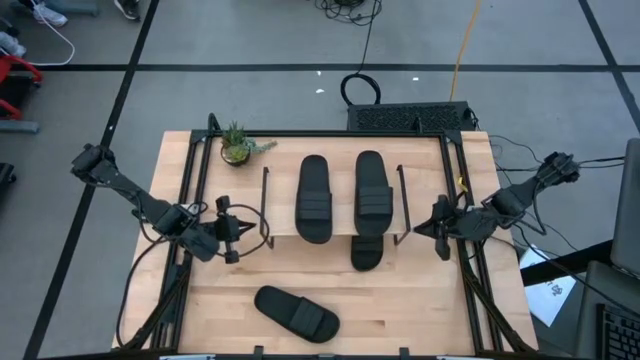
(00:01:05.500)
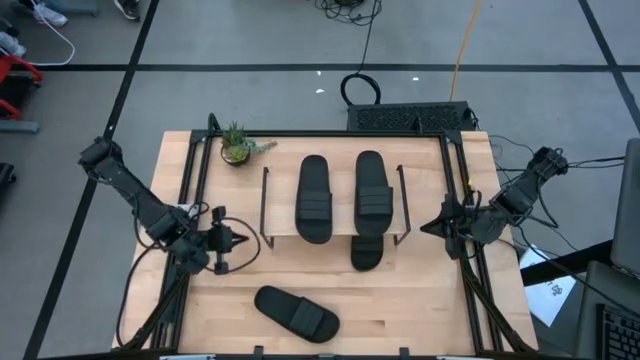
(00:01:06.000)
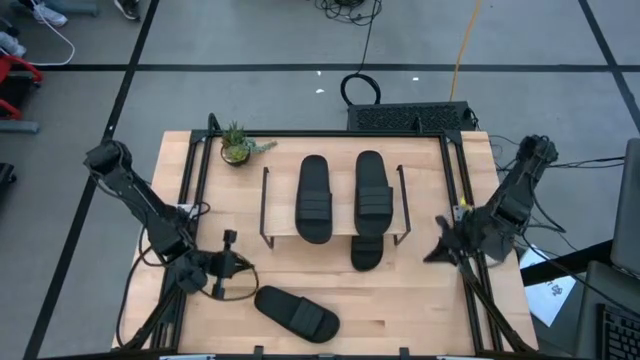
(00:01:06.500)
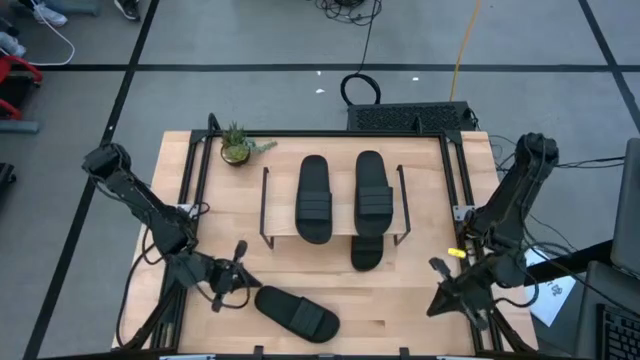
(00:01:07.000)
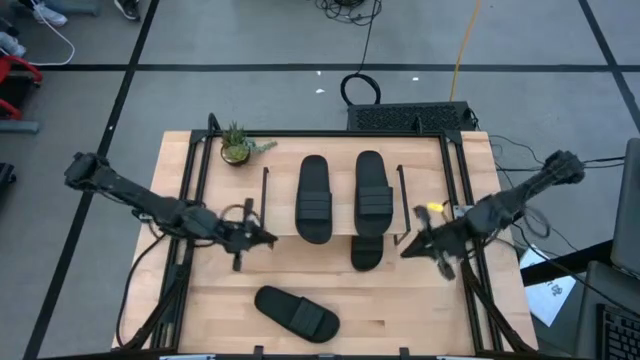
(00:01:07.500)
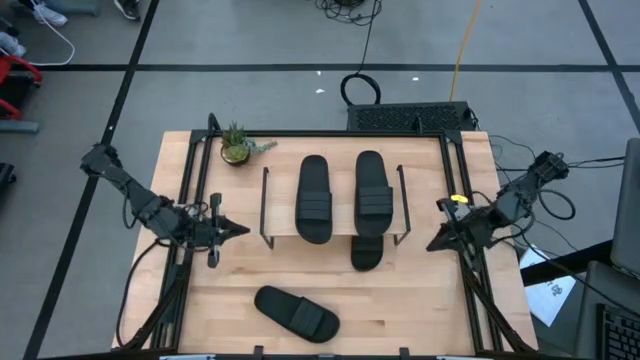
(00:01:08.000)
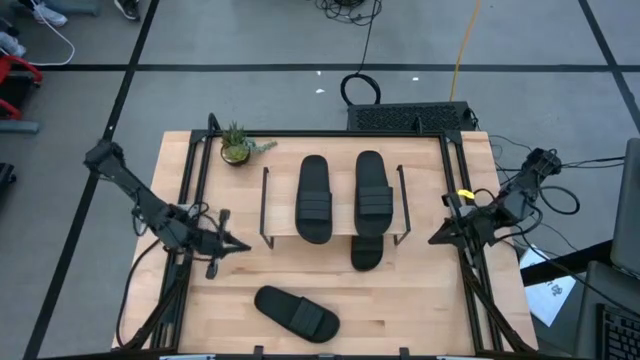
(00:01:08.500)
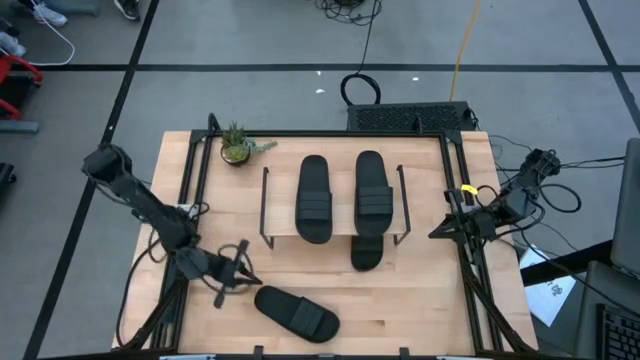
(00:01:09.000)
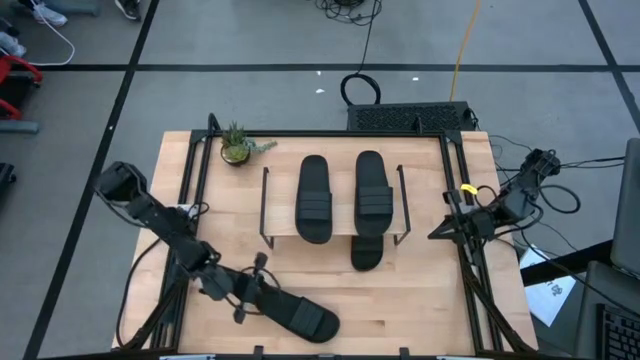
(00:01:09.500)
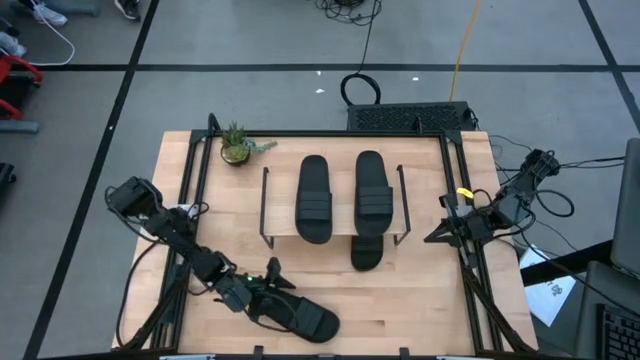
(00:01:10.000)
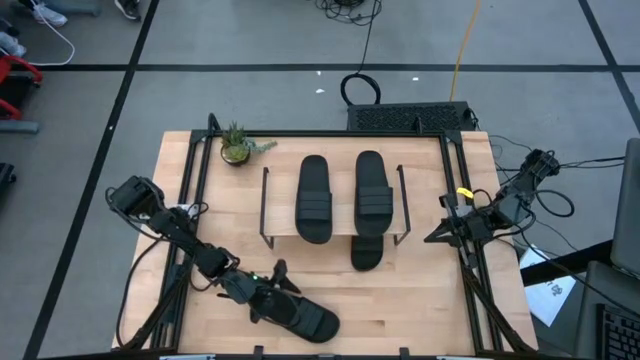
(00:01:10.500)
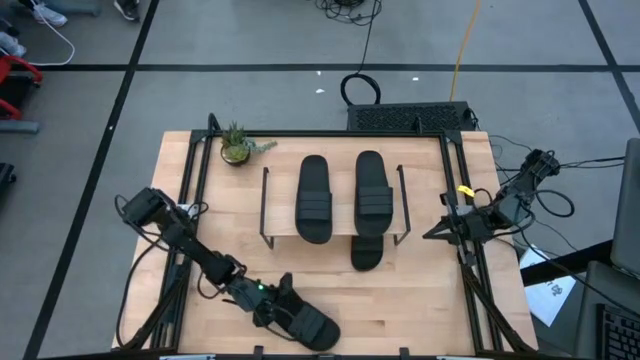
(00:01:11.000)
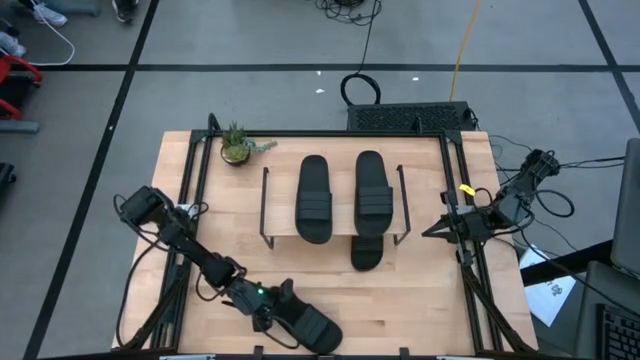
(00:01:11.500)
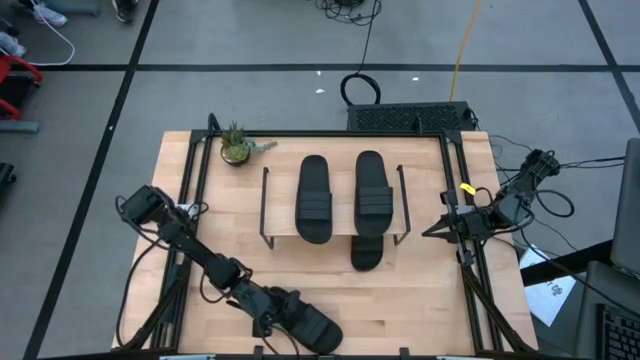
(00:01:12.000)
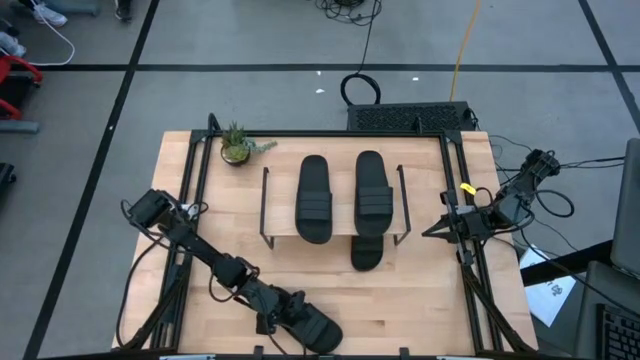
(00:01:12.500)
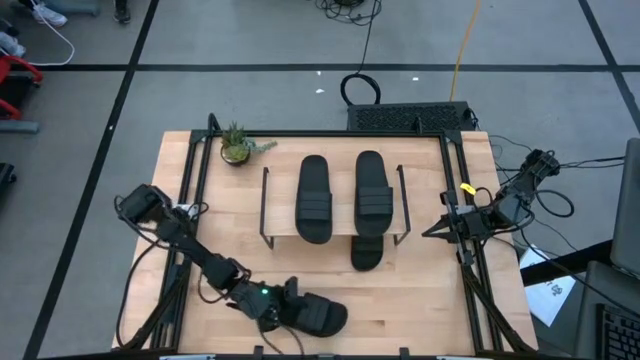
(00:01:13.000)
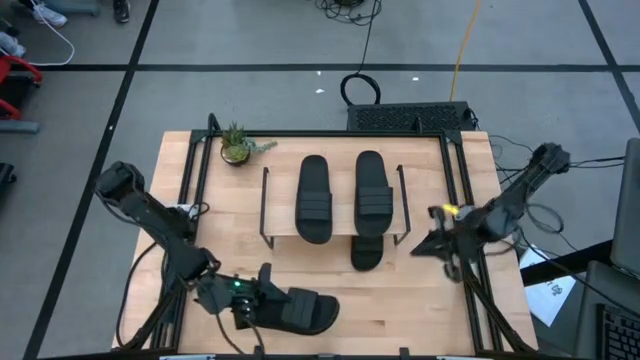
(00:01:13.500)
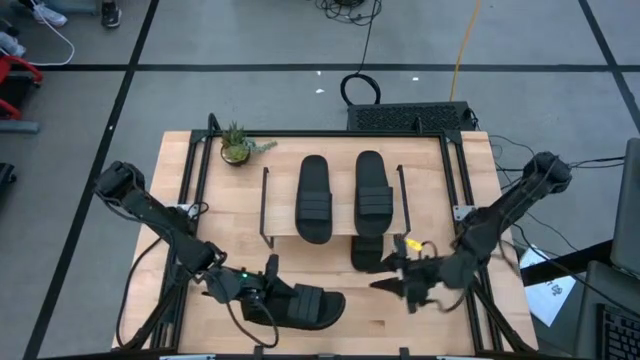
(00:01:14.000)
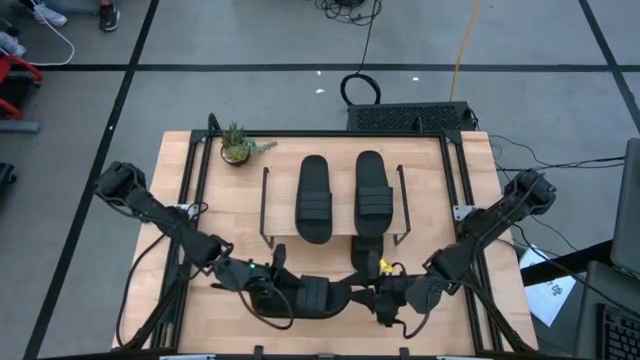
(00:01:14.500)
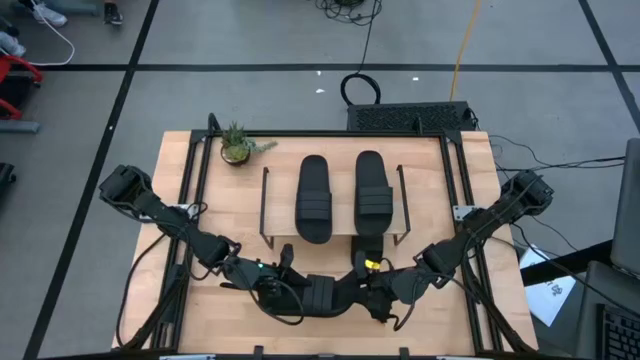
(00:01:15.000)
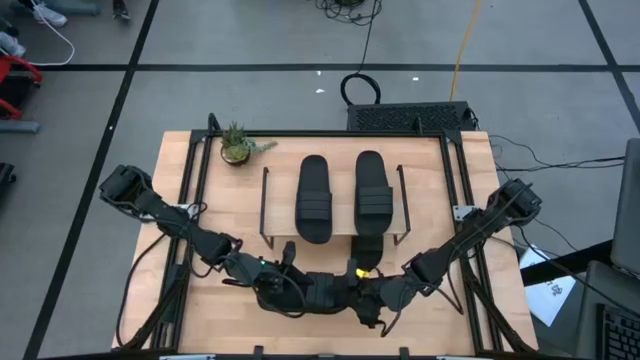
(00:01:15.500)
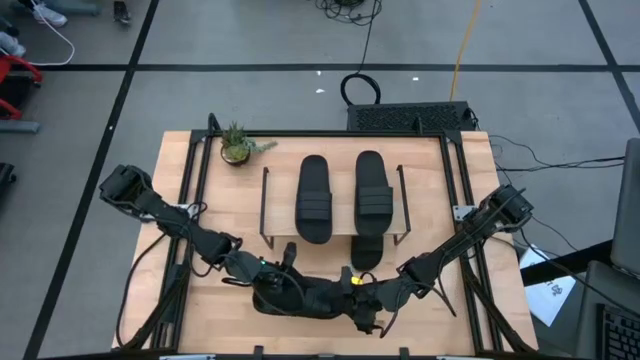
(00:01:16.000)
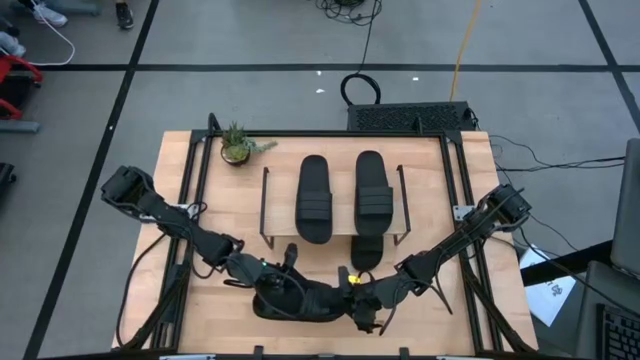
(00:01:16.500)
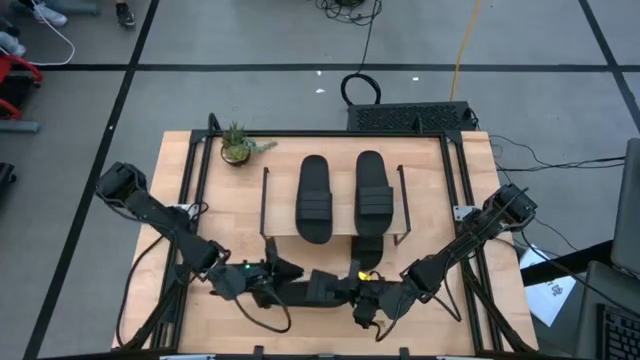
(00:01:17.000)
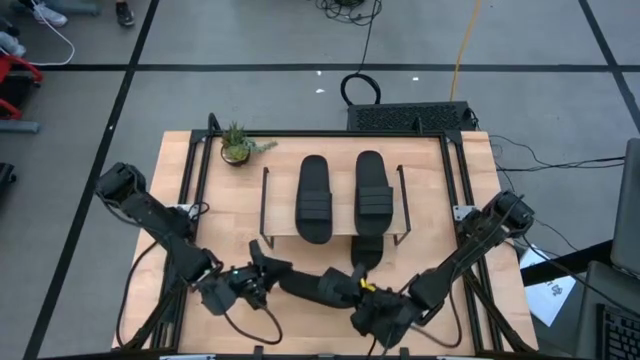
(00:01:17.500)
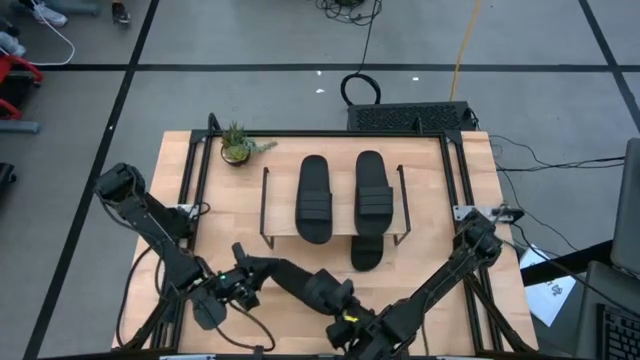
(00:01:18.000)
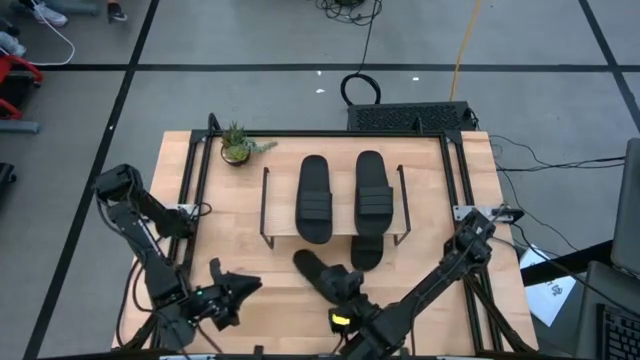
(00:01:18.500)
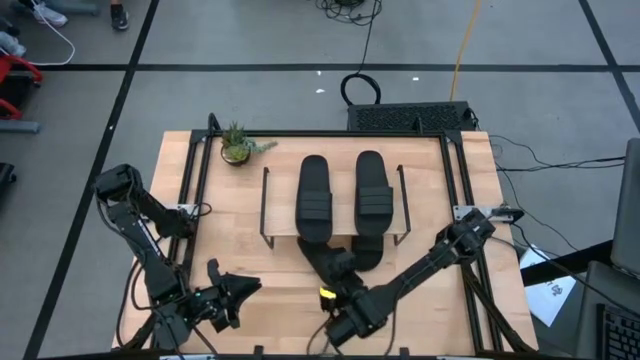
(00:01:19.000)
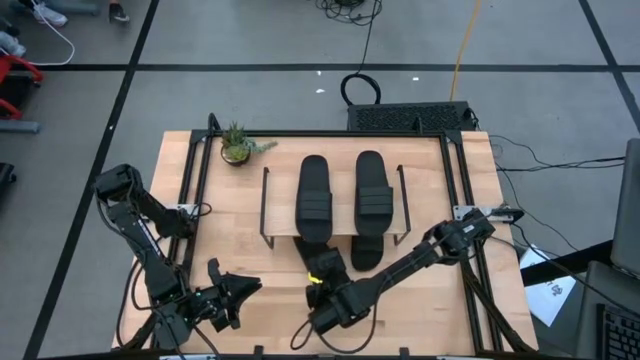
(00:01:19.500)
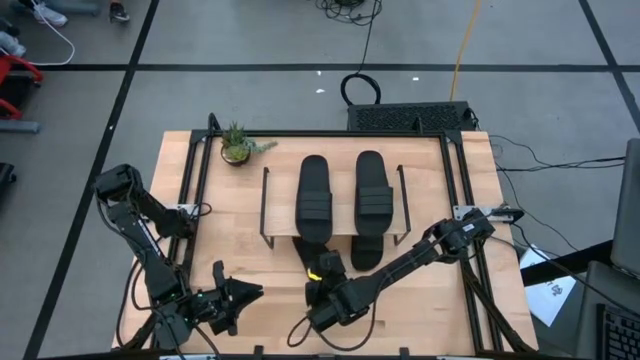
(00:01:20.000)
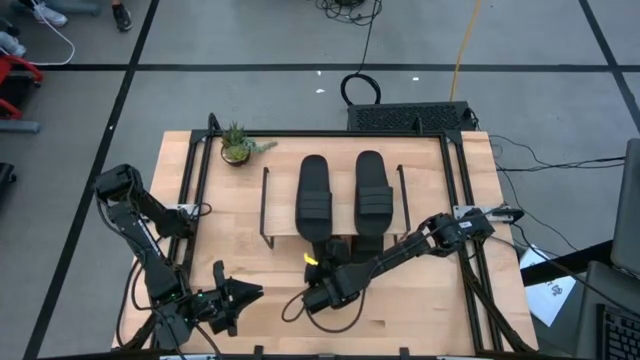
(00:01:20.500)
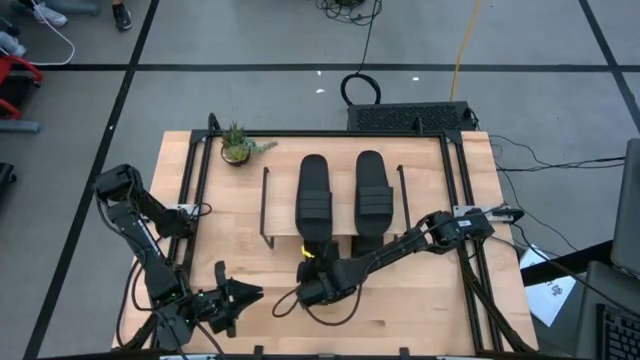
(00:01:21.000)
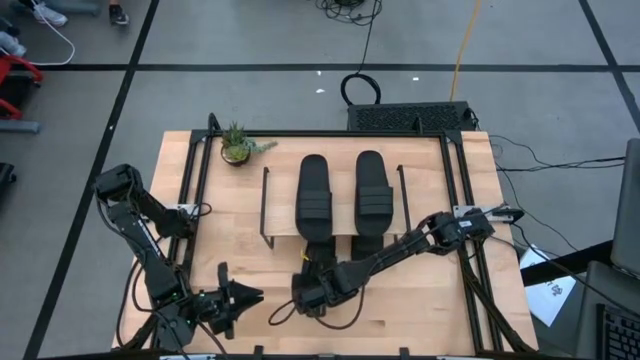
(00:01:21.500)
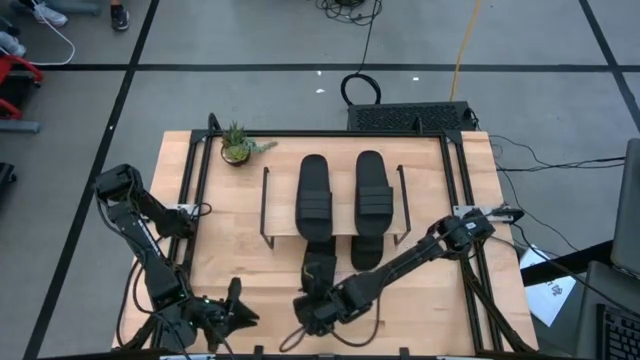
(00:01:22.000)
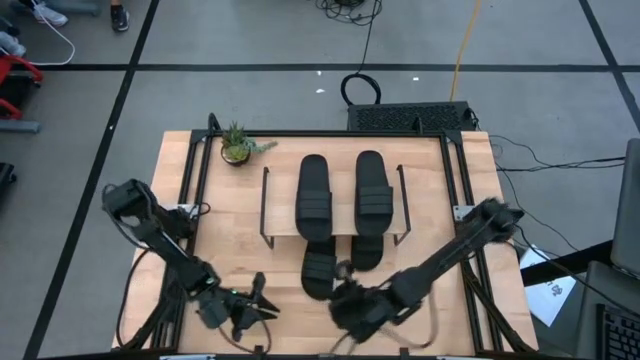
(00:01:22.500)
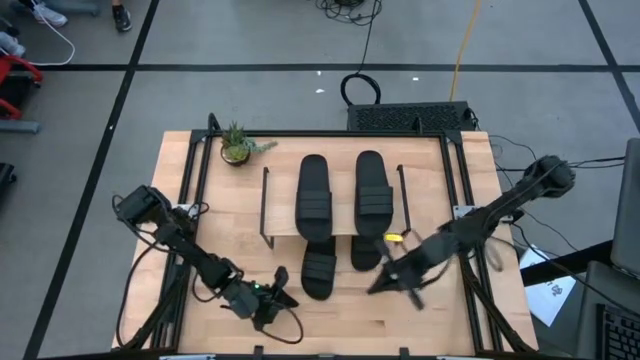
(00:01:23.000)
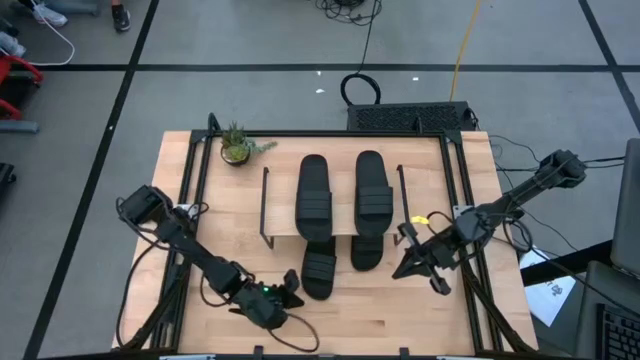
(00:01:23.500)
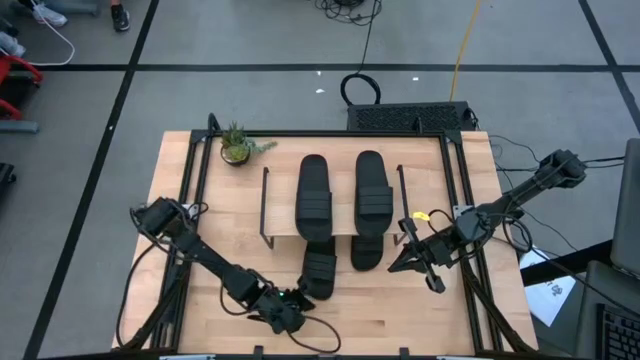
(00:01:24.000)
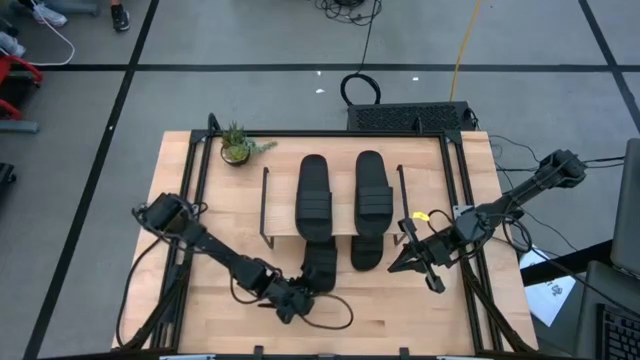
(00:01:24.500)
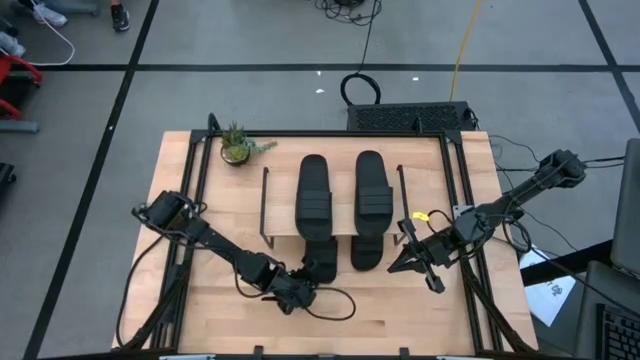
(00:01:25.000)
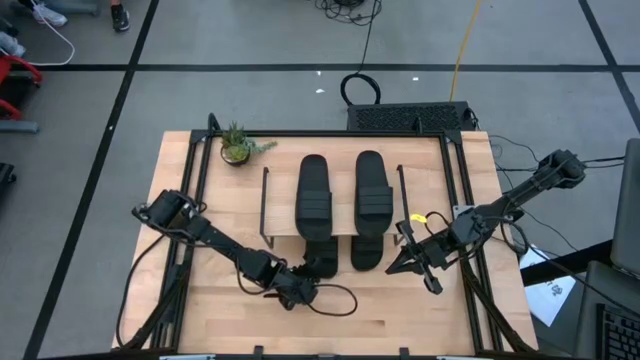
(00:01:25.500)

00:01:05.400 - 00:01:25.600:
Task: Pick and place slides into the shelf
Put the black slipper under the shelf
